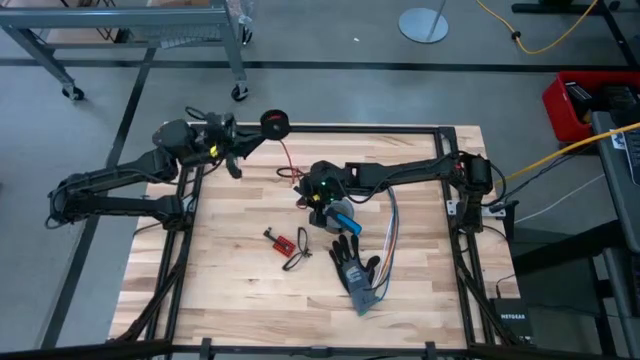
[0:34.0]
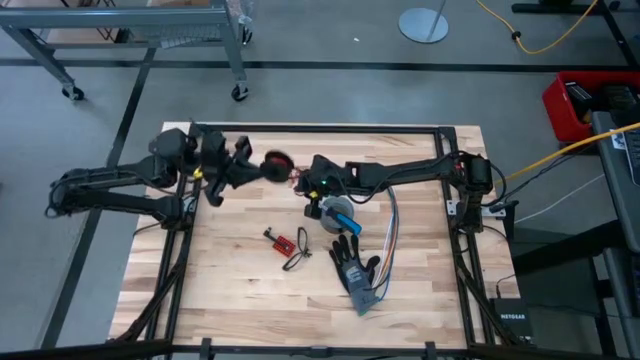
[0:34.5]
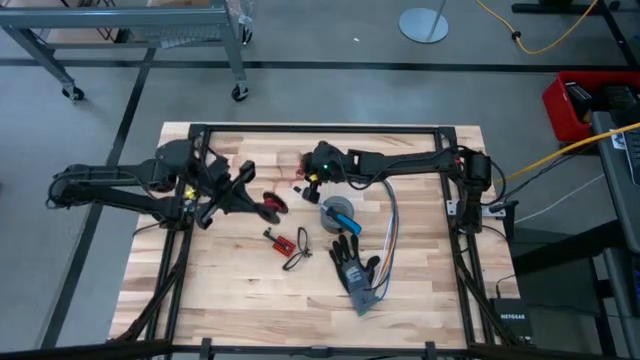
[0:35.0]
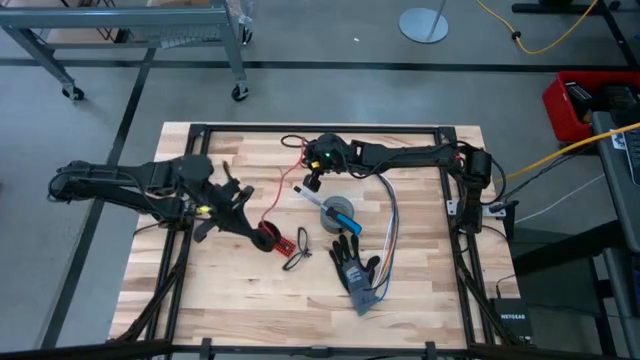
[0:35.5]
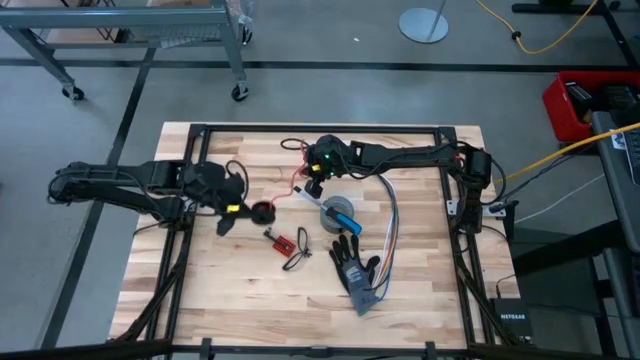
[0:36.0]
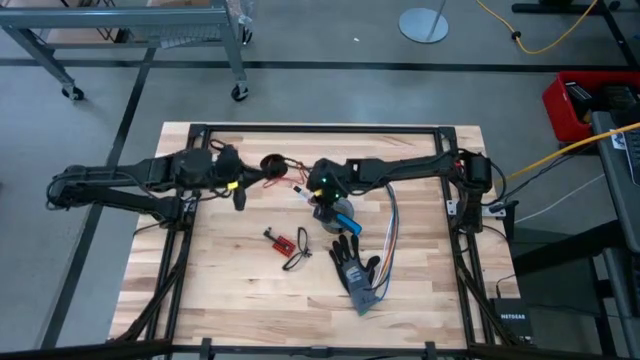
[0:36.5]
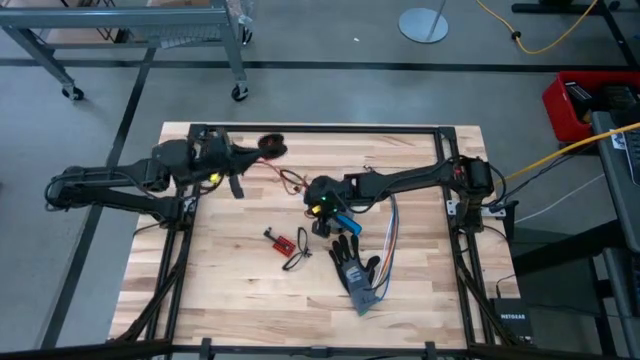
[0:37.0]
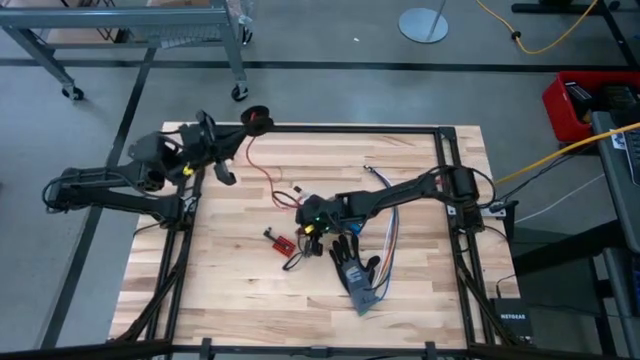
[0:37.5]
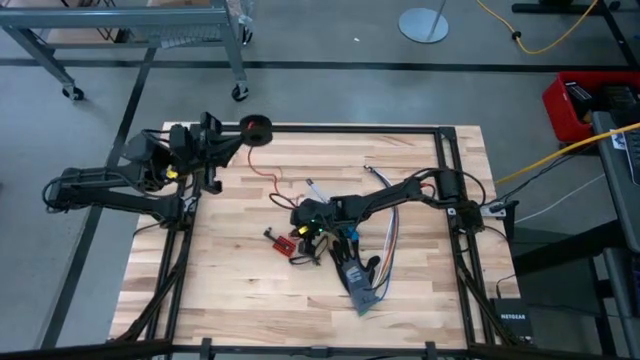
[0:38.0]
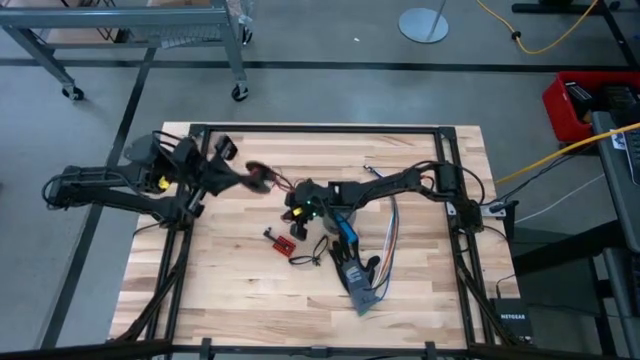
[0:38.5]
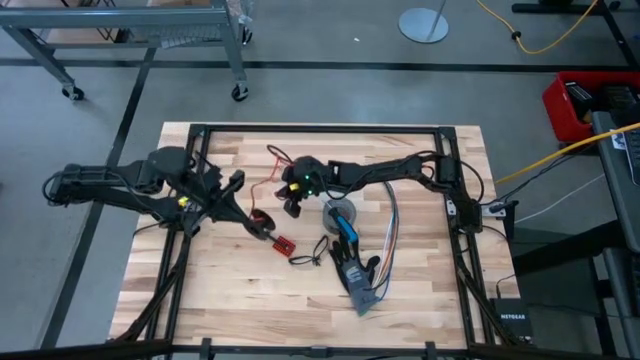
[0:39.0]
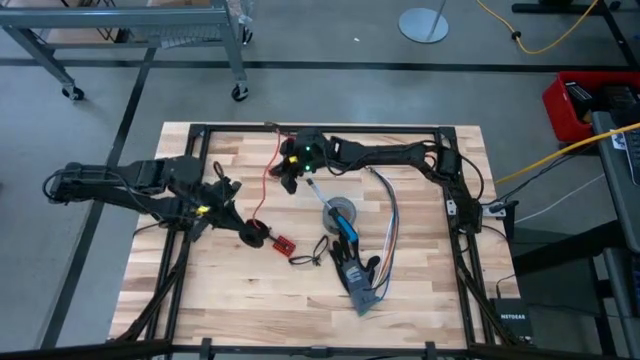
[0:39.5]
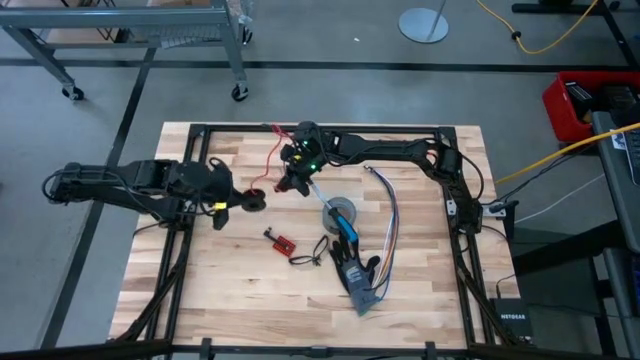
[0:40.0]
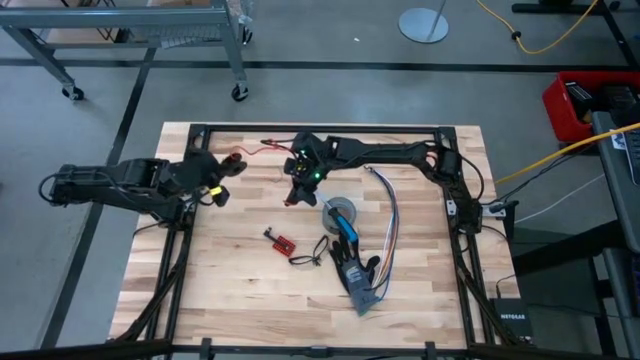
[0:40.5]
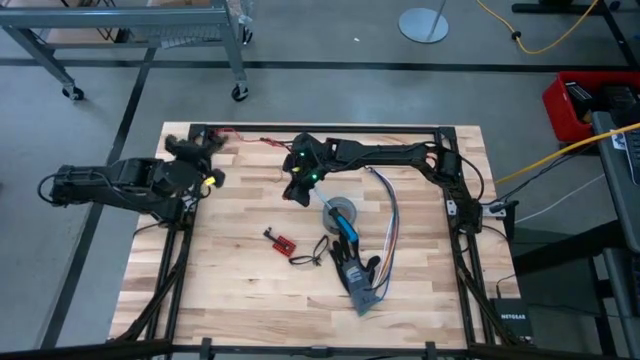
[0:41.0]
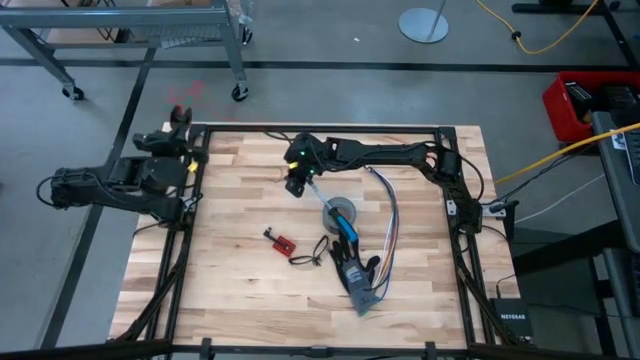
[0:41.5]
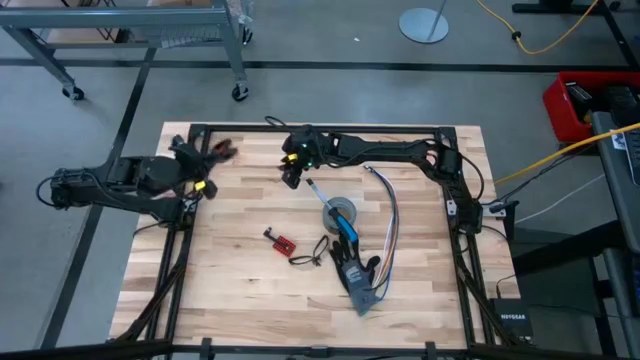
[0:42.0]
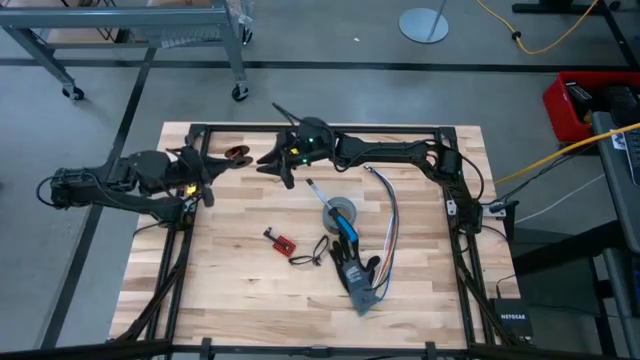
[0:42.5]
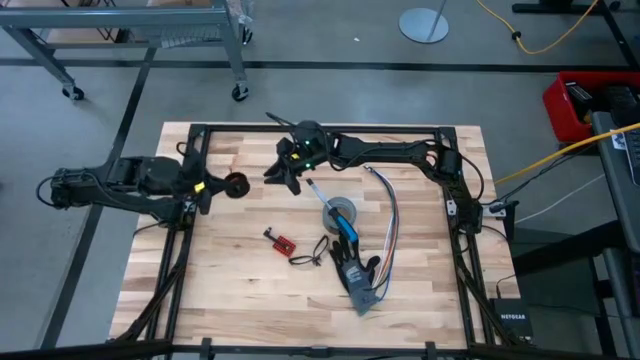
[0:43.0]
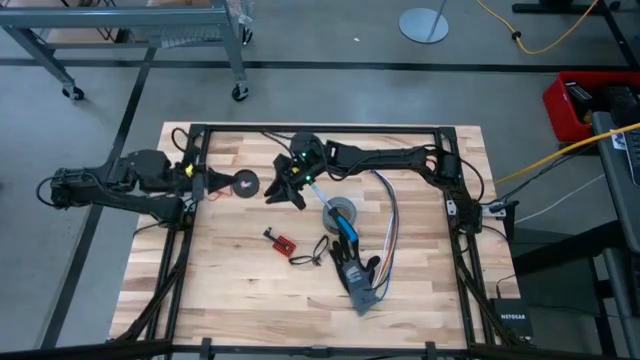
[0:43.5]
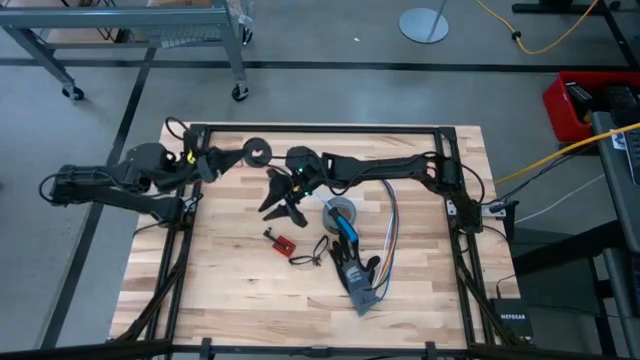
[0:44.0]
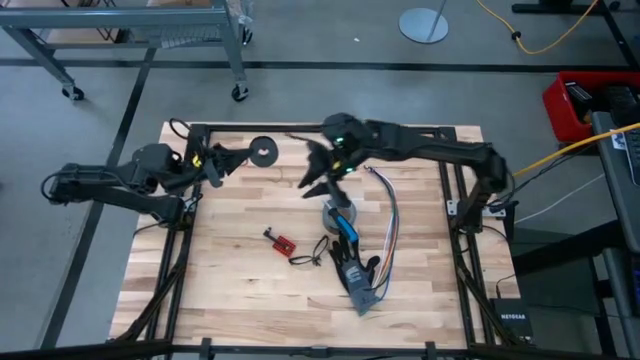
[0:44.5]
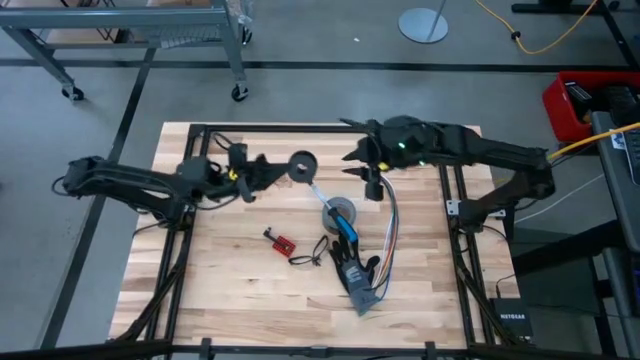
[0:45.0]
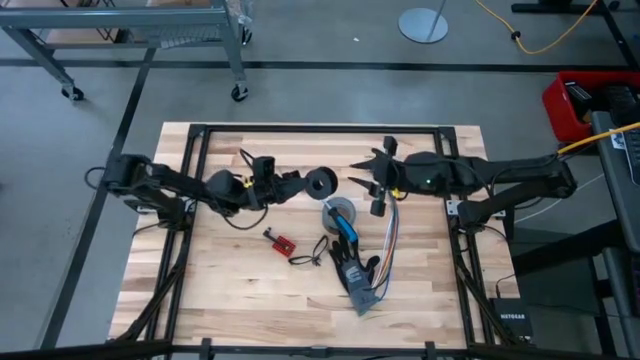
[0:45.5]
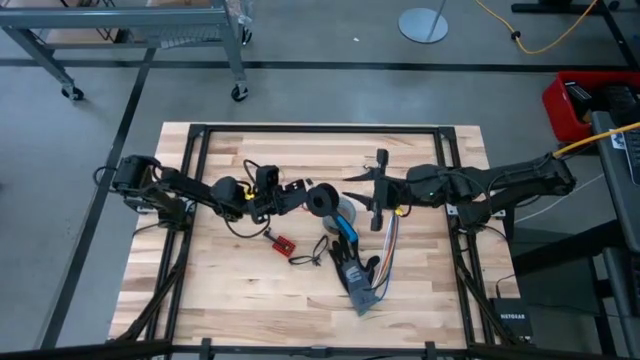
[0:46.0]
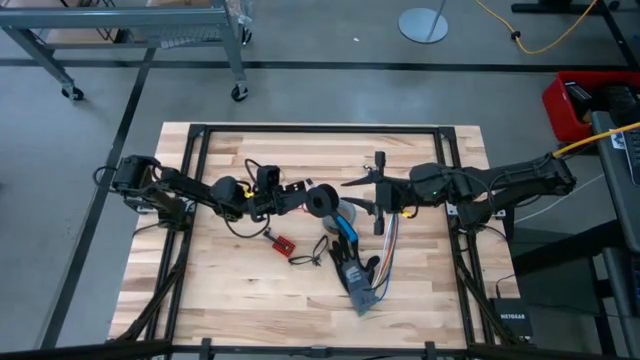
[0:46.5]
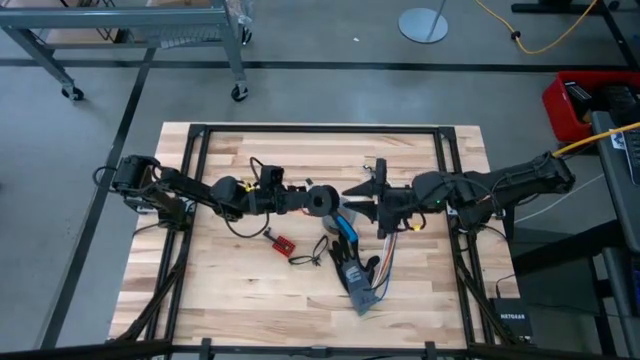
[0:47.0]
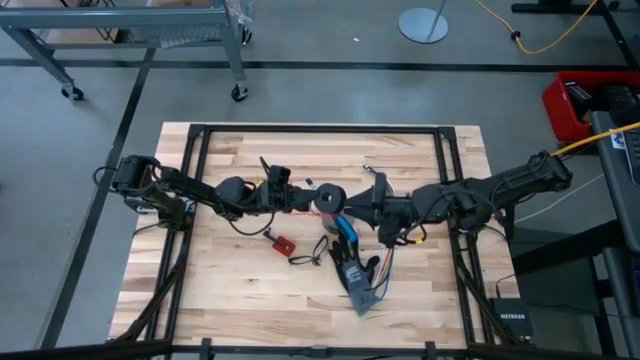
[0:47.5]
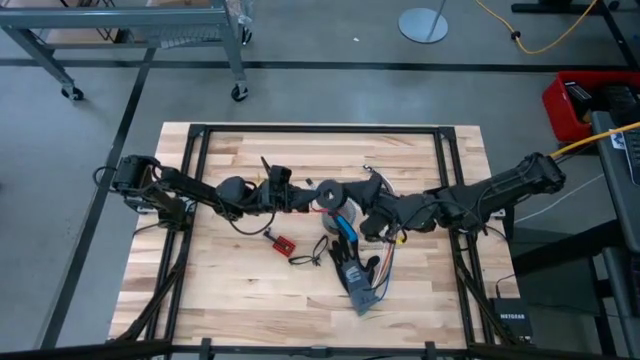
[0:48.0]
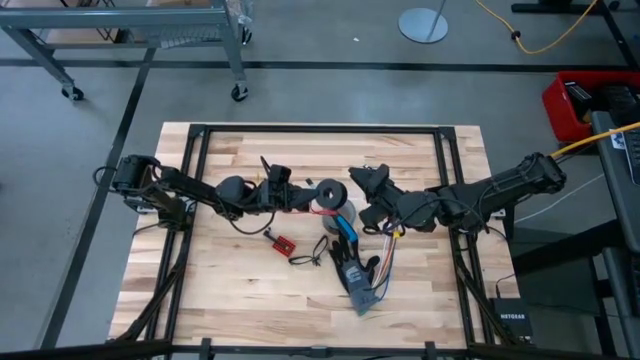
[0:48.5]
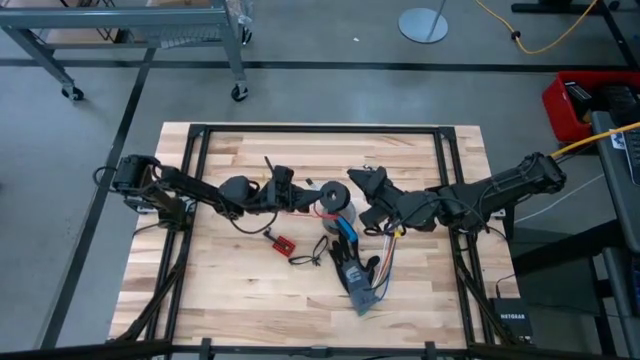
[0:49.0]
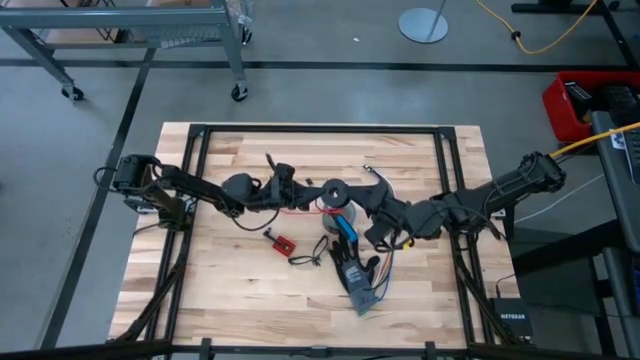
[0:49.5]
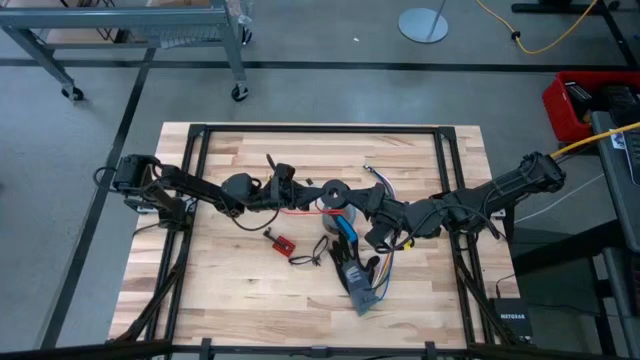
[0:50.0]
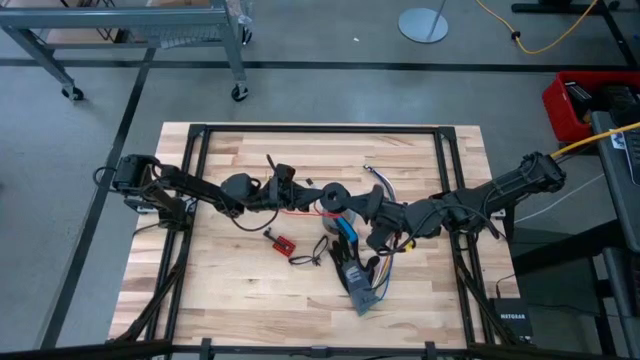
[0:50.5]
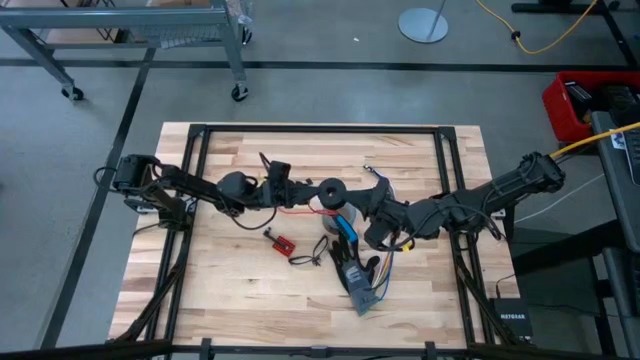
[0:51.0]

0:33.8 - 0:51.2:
Task: Coil cords
Uncoil the red wire from the spool

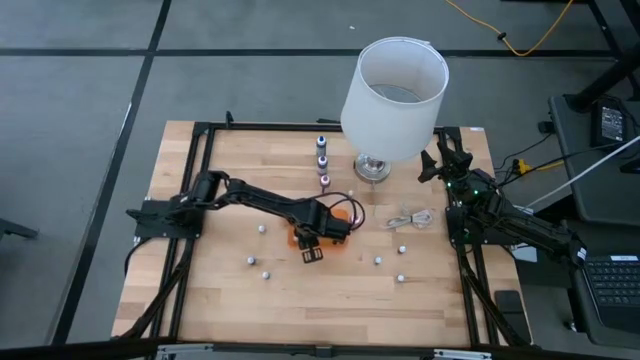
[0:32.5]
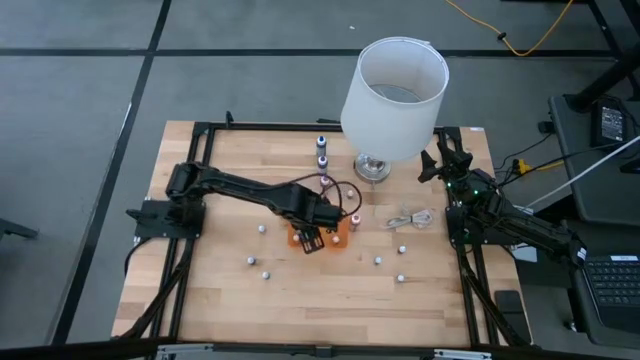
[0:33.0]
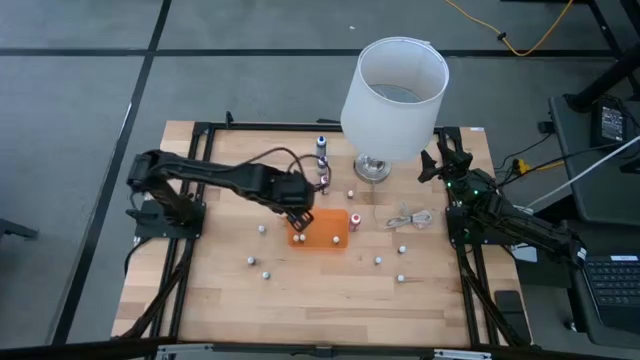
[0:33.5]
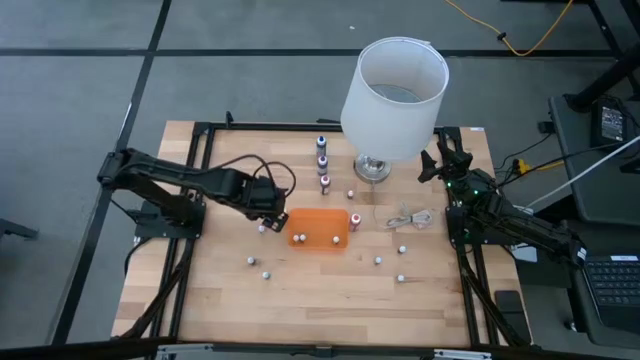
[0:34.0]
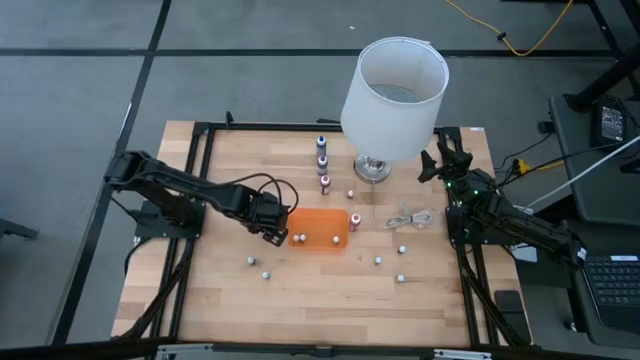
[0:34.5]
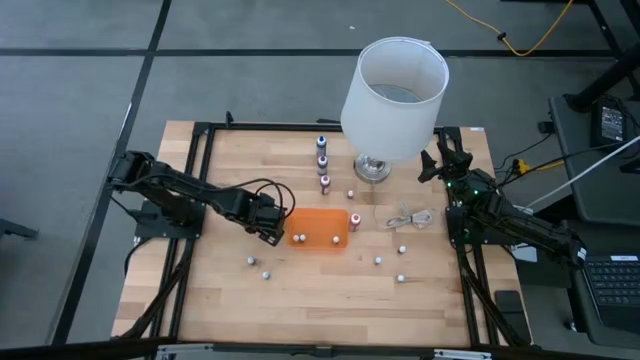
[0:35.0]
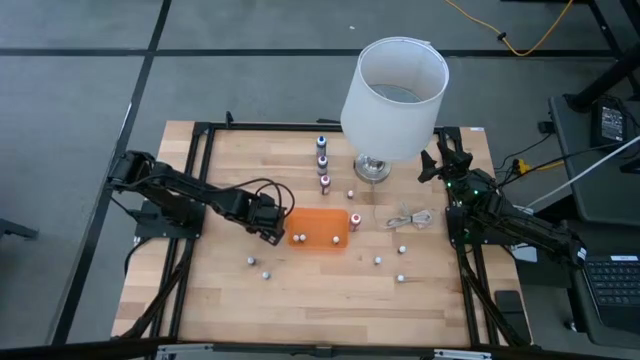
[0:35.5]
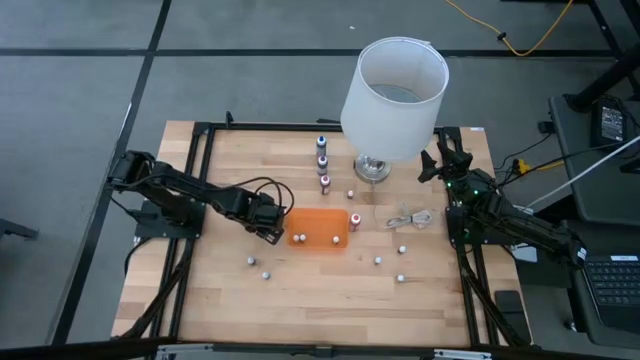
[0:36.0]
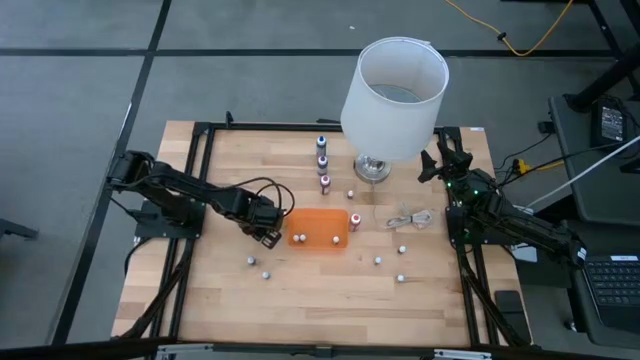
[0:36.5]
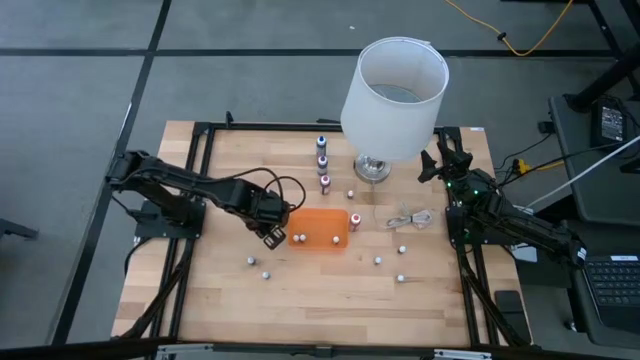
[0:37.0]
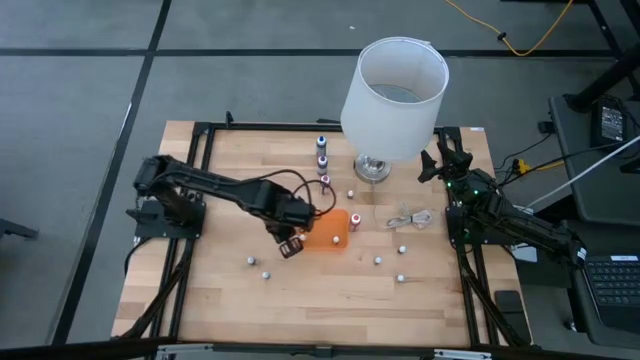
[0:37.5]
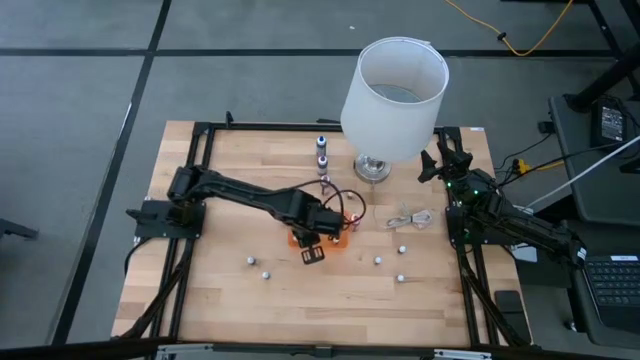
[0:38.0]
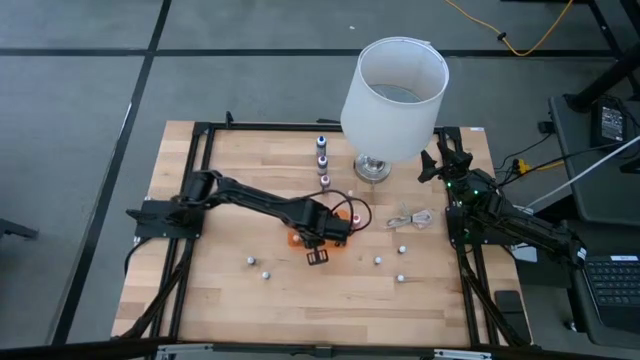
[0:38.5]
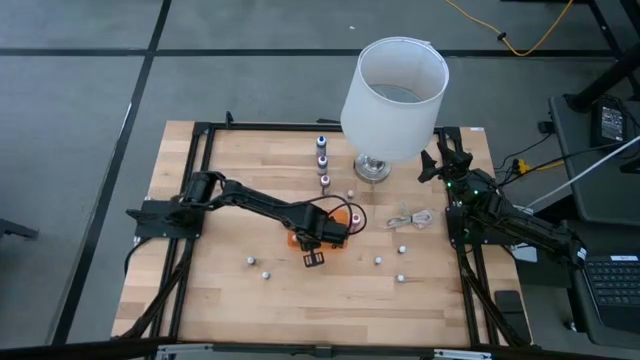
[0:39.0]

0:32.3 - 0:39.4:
Task: Pick & Place food coloring
Put the small black food coloring bottle into the orange bin
